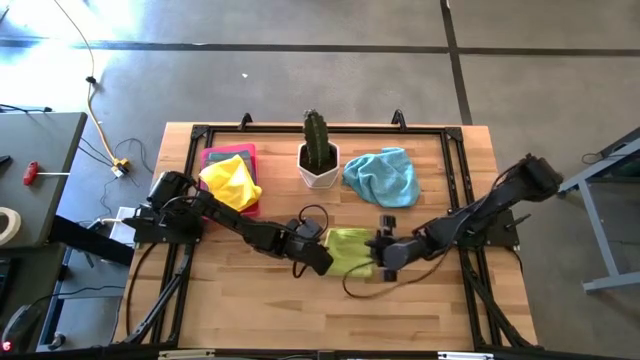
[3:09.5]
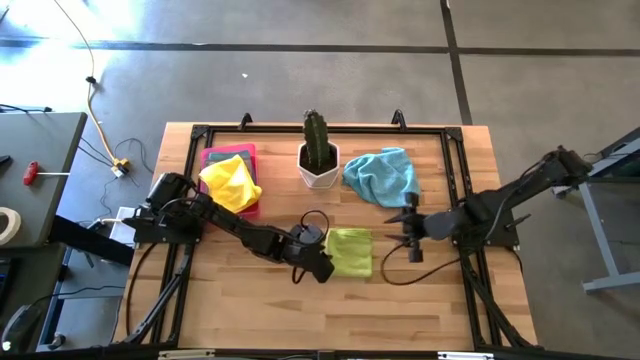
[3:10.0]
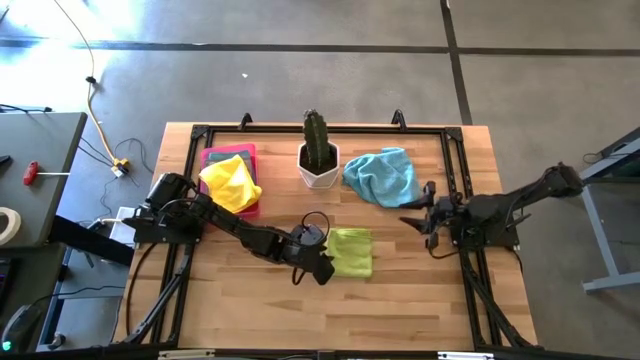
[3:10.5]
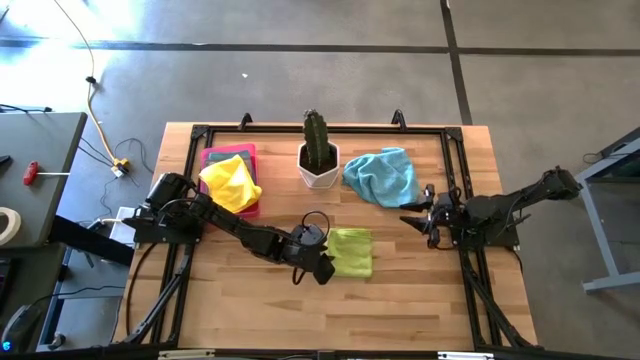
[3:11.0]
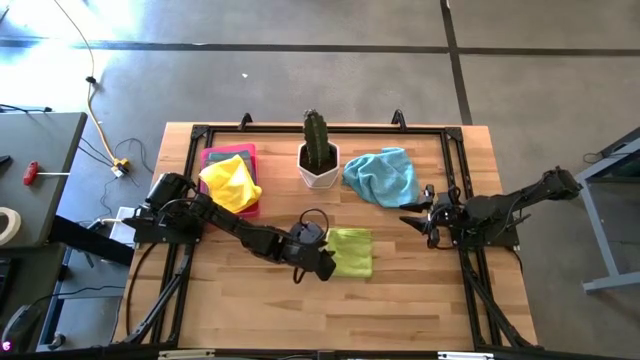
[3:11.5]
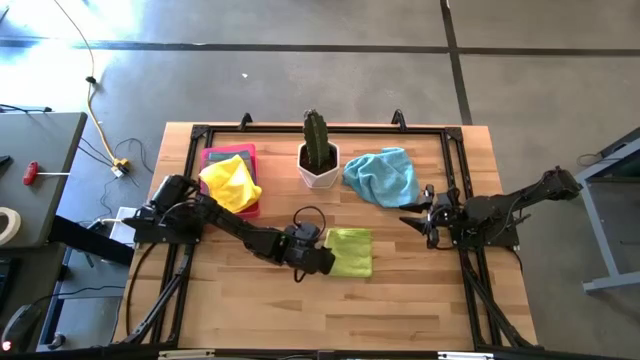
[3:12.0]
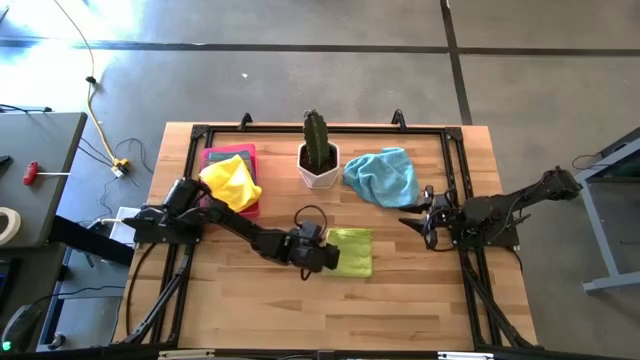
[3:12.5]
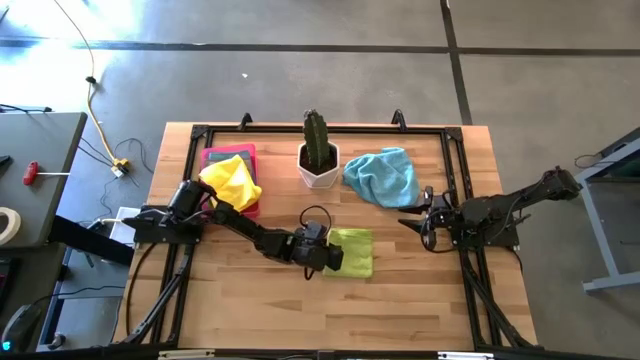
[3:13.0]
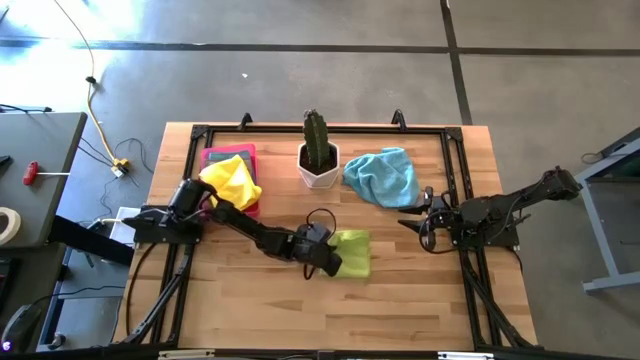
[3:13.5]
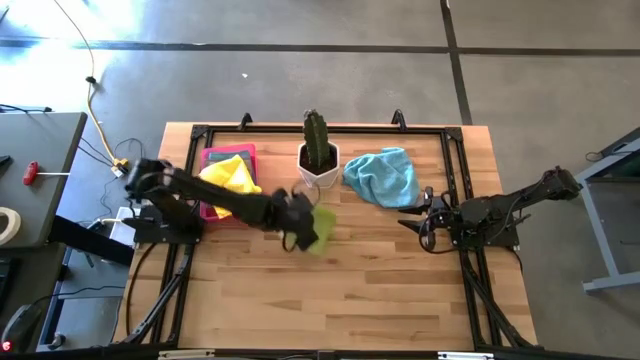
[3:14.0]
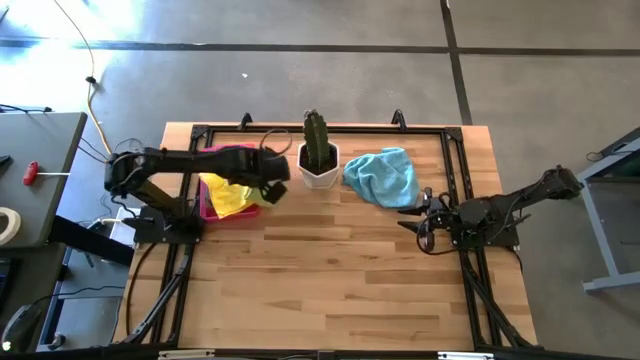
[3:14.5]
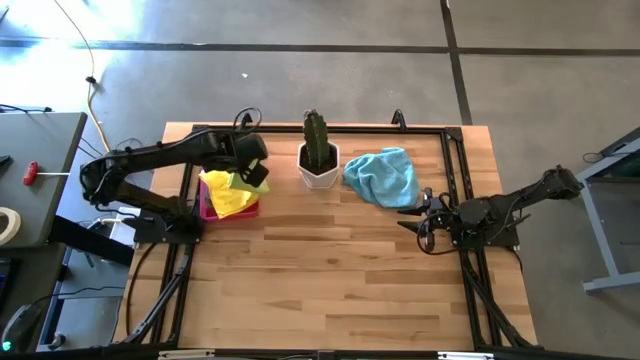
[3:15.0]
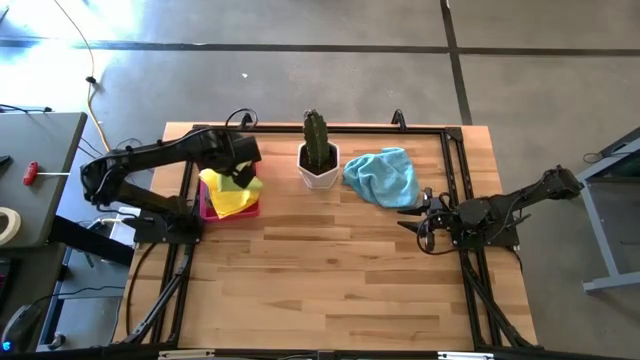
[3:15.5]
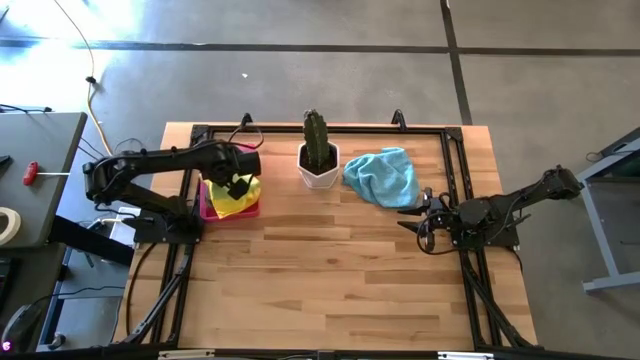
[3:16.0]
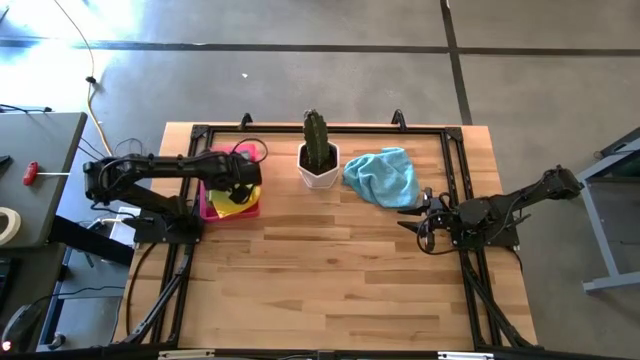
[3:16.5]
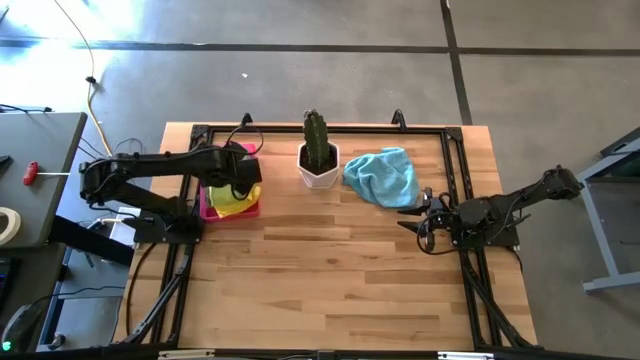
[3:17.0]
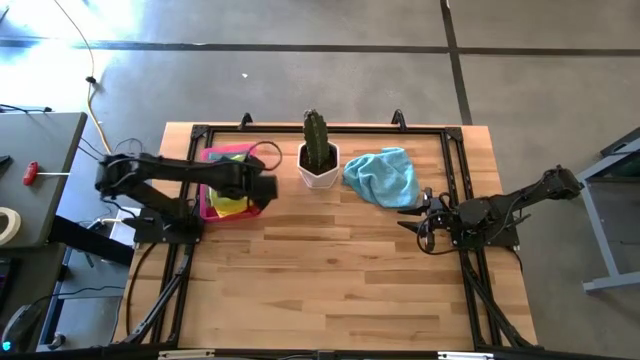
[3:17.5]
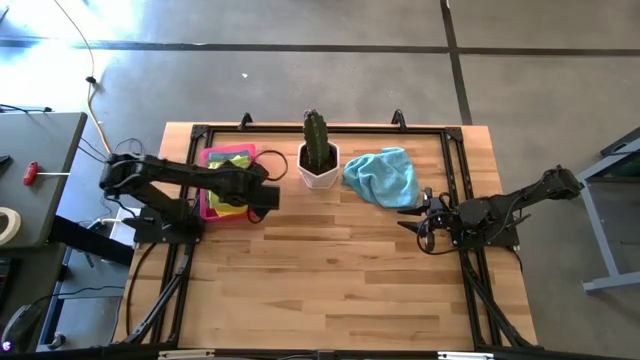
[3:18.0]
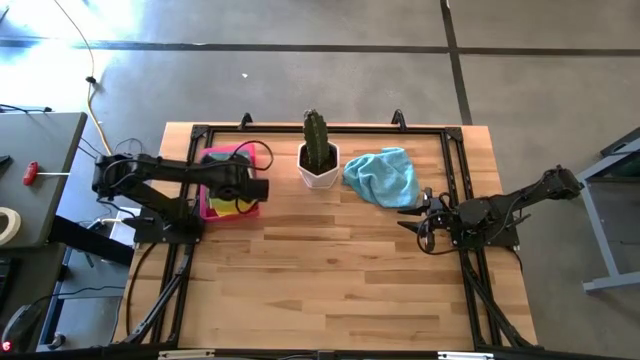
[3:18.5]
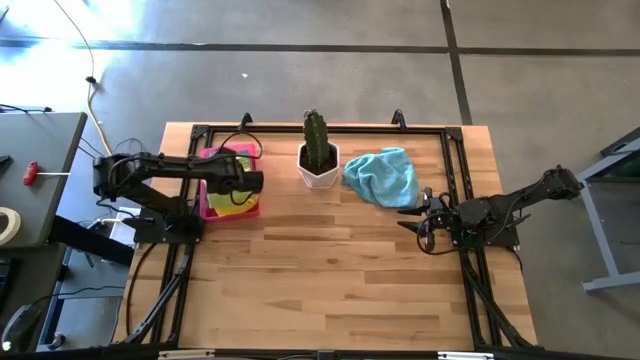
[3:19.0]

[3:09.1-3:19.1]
Task: Fold microfiber towels
Put the light green towel in the pink bin

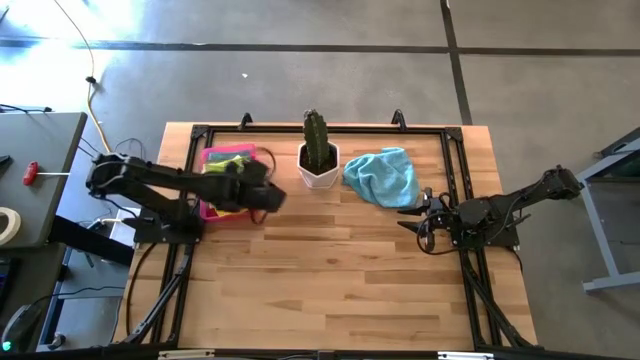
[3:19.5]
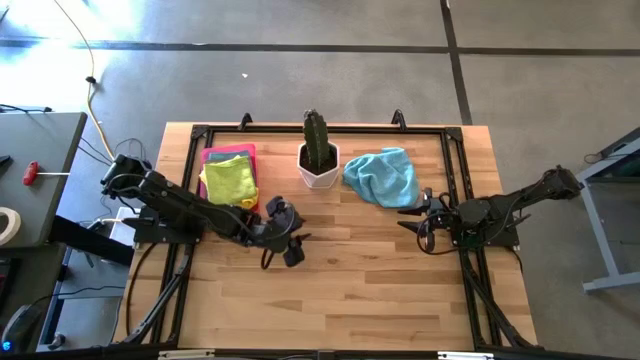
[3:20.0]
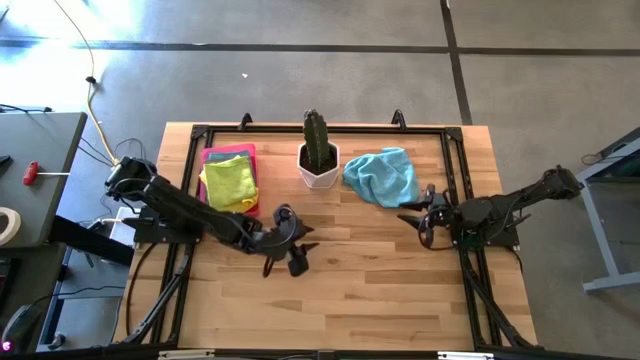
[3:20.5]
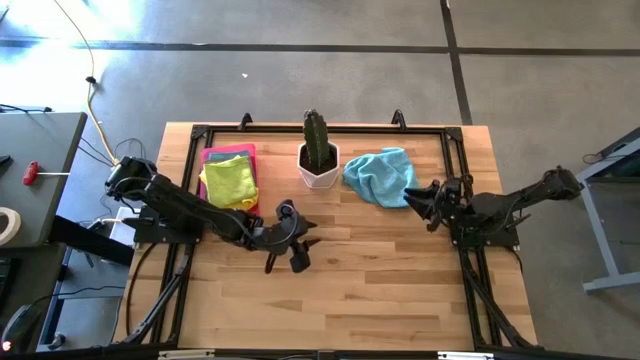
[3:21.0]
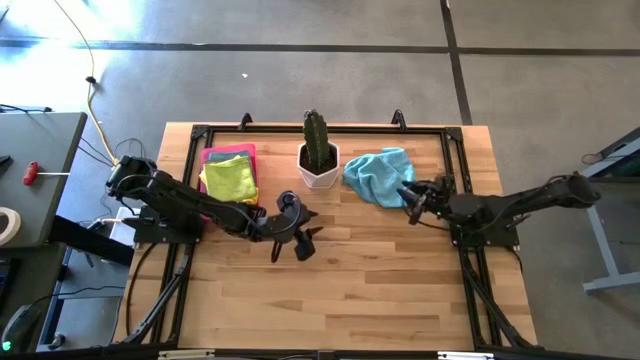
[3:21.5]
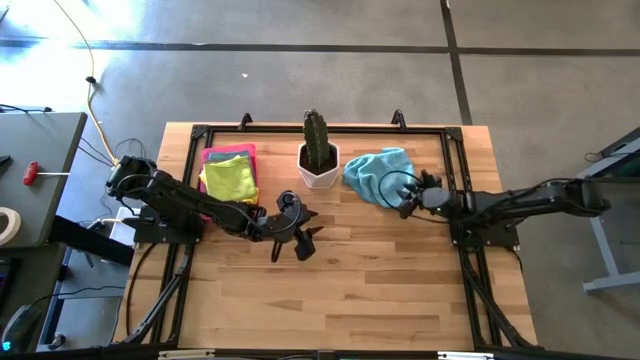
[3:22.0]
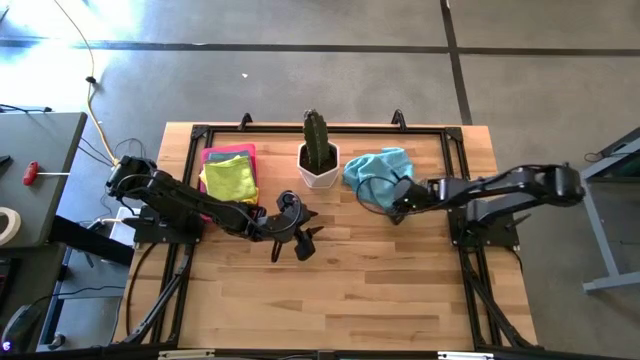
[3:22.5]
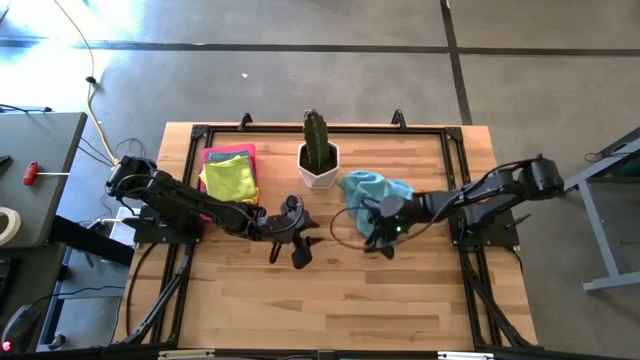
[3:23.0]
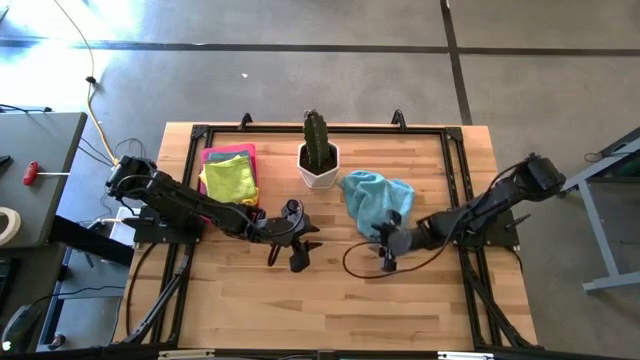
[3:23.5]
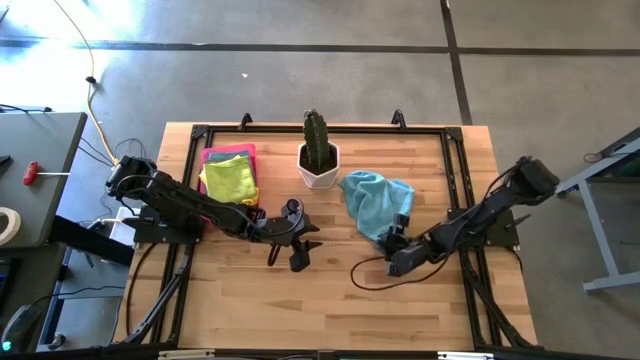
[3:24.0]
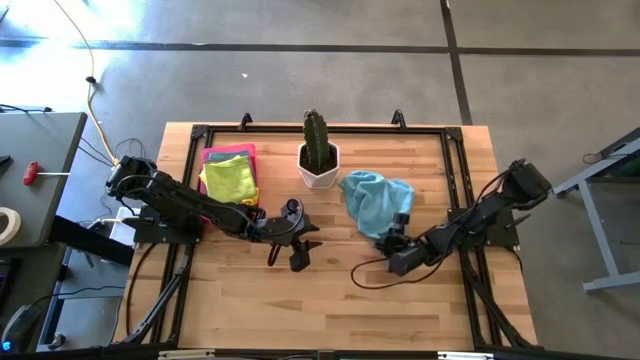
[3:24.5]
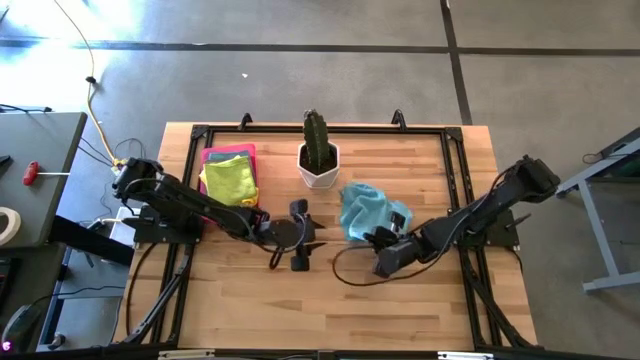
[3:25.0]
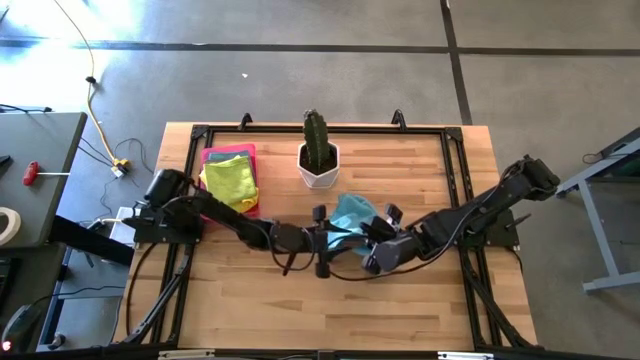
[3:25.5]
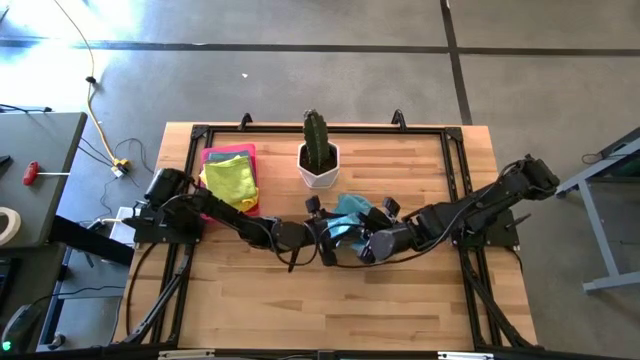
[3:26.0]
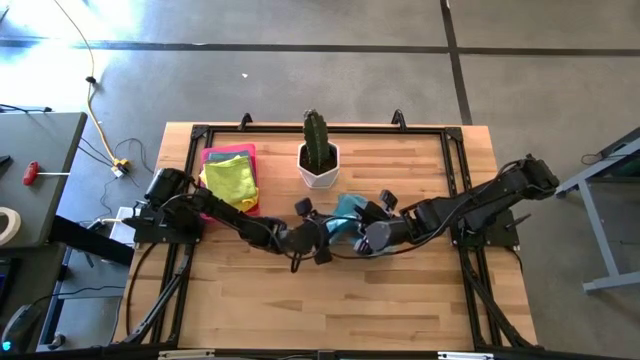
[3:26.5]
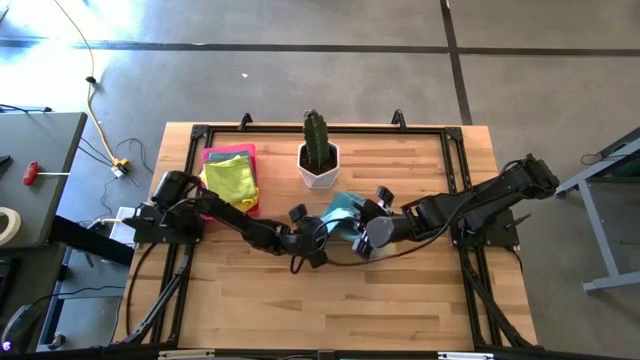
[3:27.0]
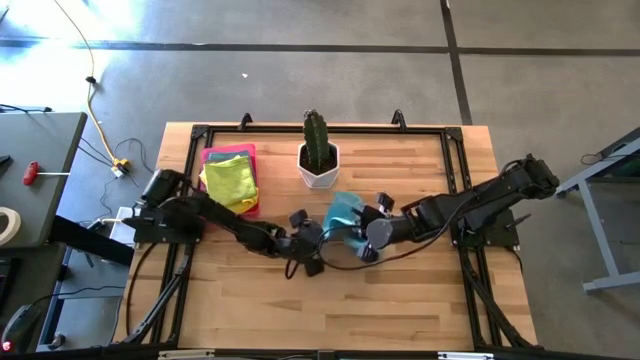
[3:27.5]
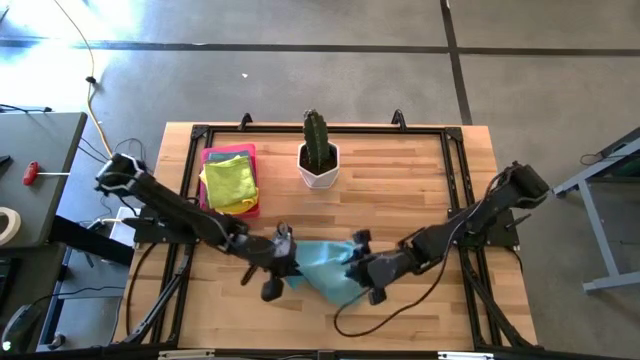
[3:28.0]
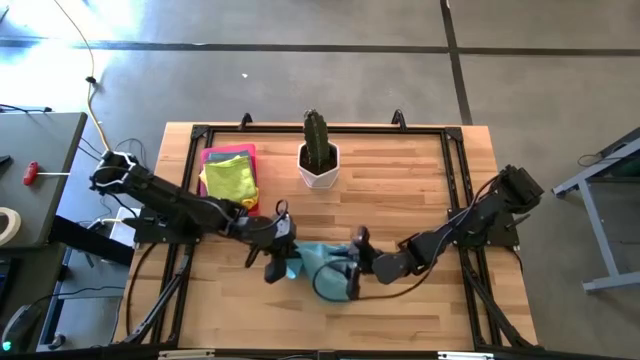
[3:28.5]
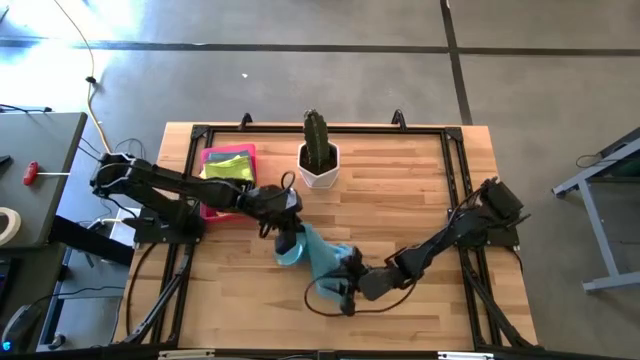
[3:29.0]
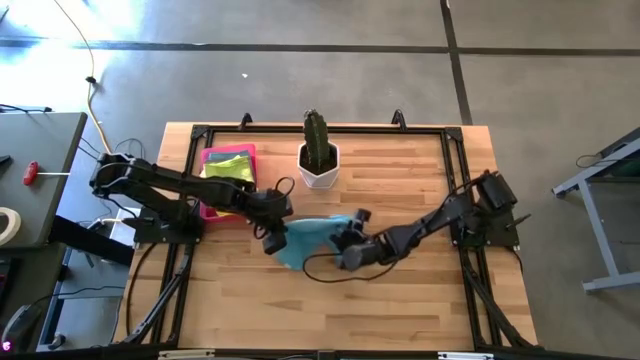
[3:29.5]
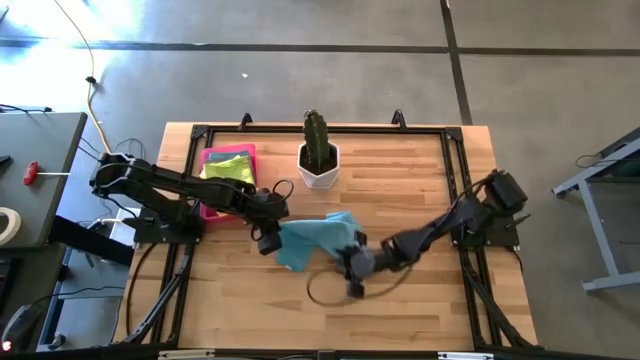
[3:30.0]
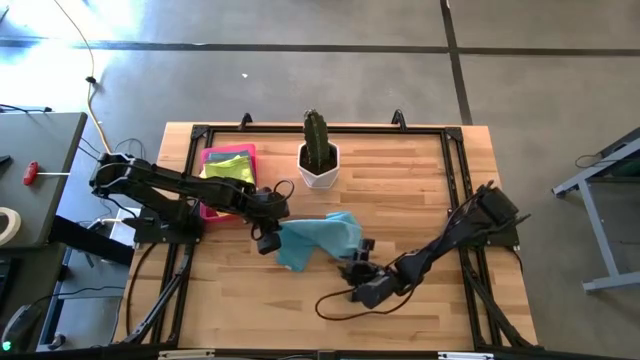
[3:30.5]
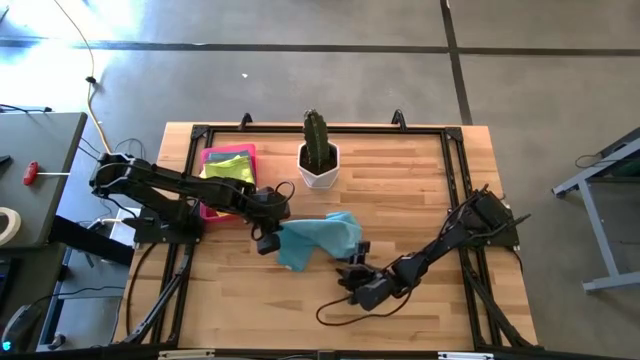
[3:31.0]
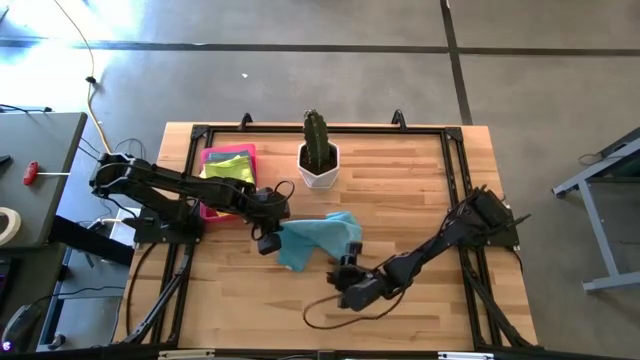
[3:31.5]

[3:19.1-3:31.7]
Fold the blue towel
